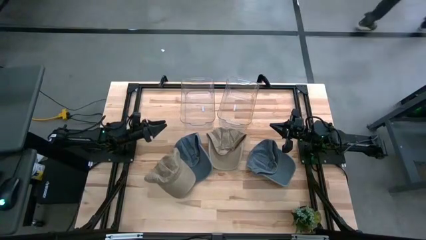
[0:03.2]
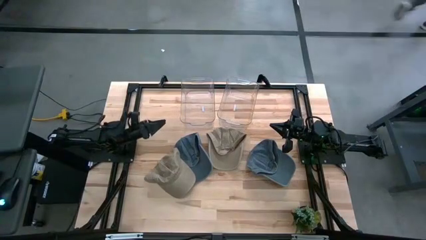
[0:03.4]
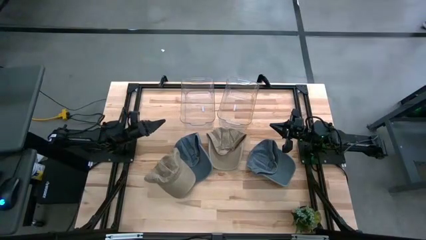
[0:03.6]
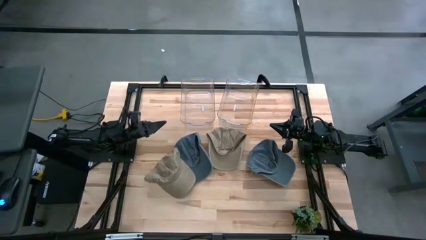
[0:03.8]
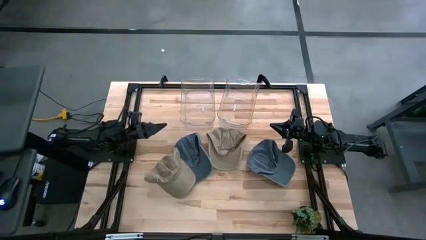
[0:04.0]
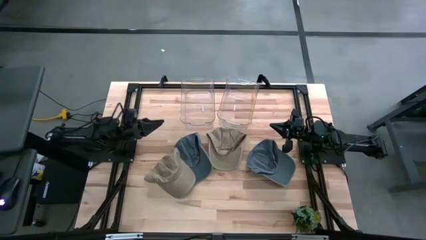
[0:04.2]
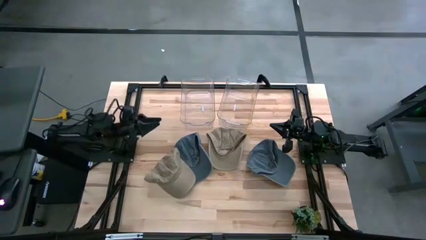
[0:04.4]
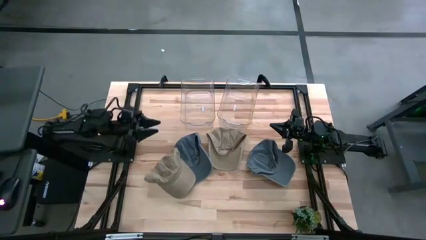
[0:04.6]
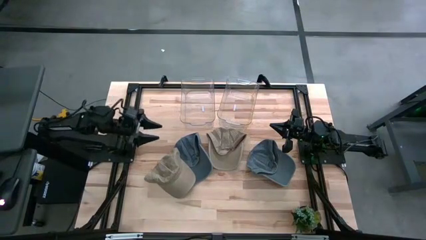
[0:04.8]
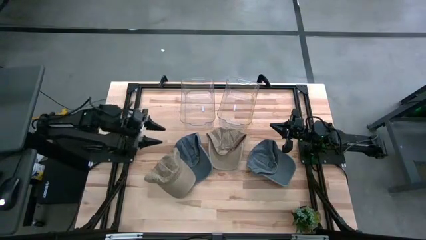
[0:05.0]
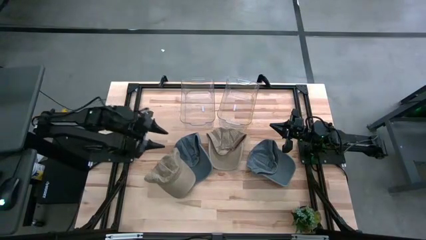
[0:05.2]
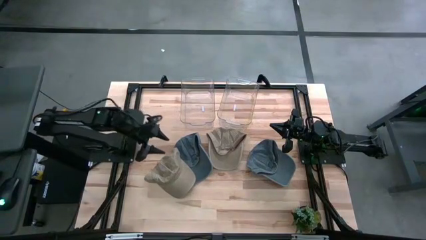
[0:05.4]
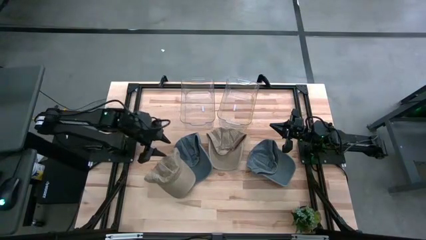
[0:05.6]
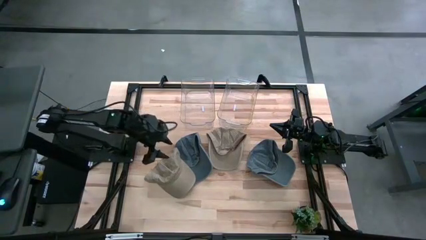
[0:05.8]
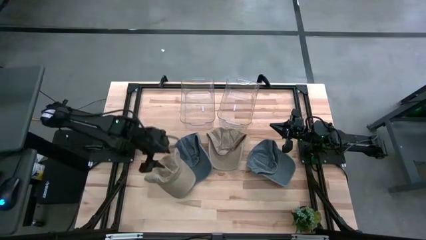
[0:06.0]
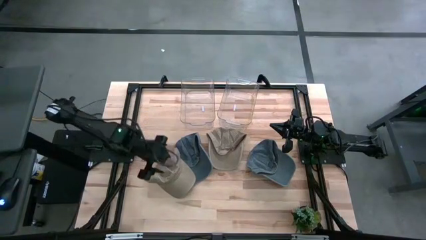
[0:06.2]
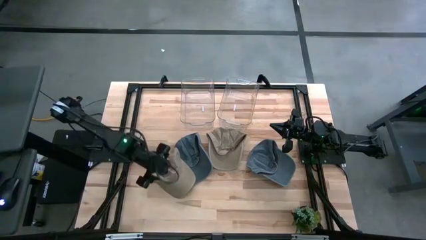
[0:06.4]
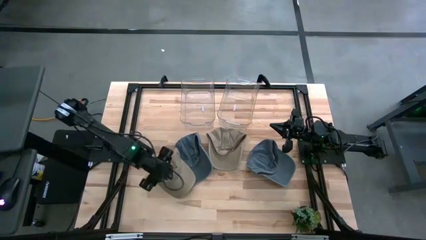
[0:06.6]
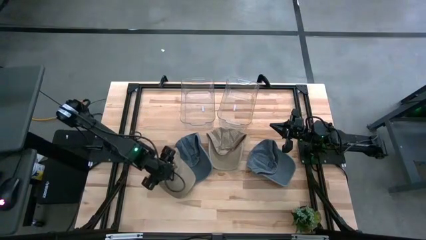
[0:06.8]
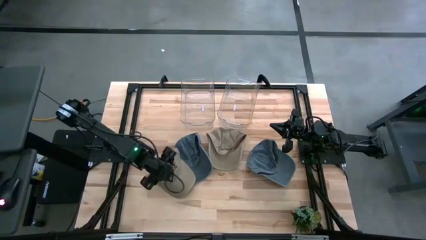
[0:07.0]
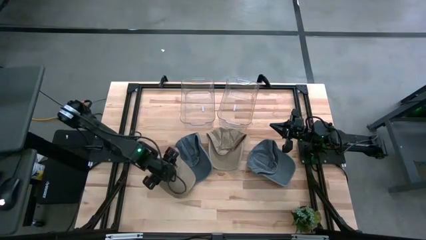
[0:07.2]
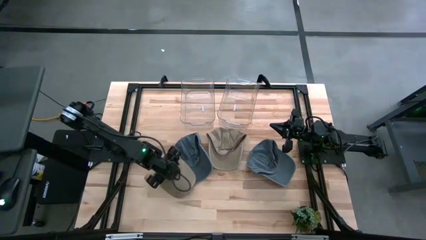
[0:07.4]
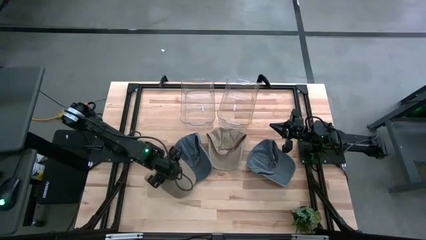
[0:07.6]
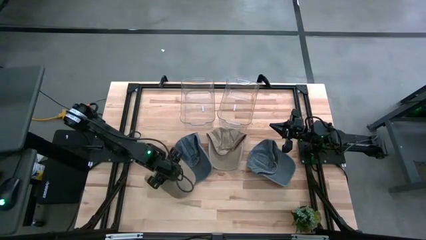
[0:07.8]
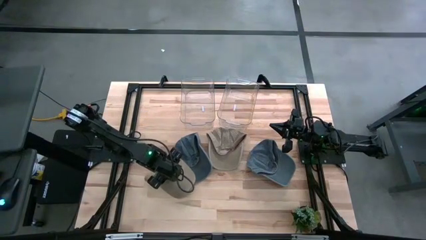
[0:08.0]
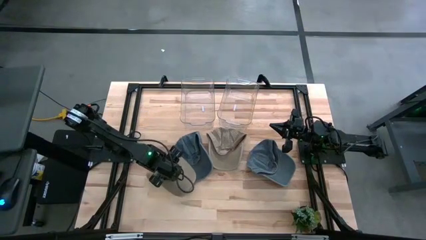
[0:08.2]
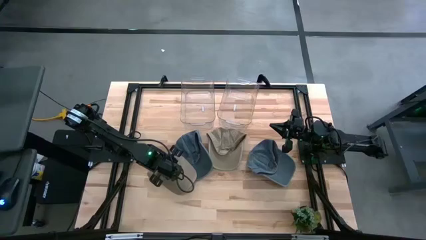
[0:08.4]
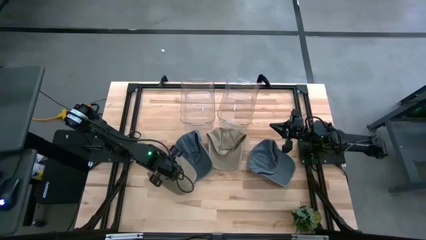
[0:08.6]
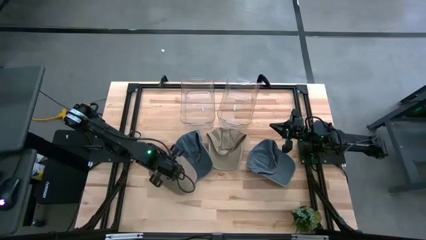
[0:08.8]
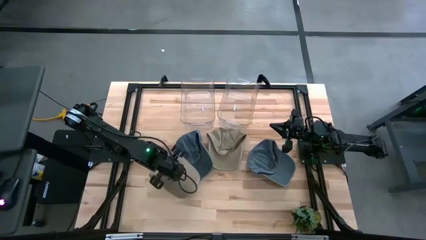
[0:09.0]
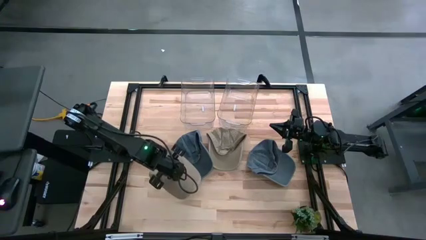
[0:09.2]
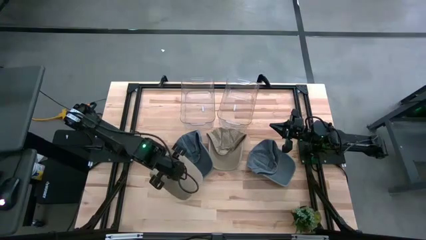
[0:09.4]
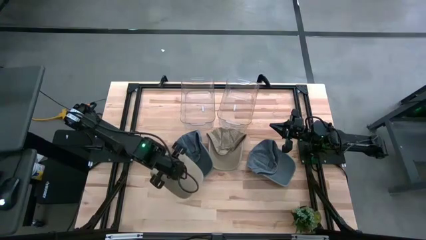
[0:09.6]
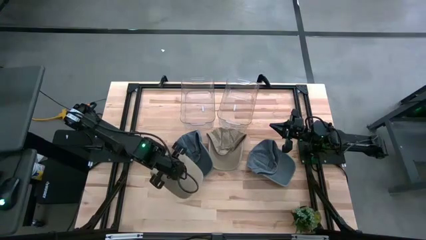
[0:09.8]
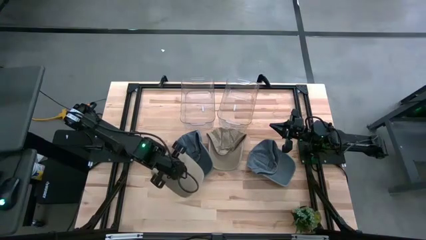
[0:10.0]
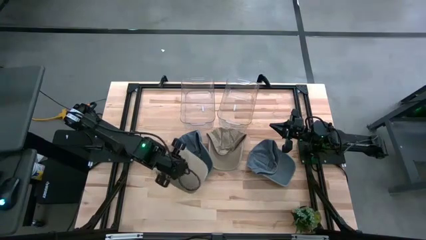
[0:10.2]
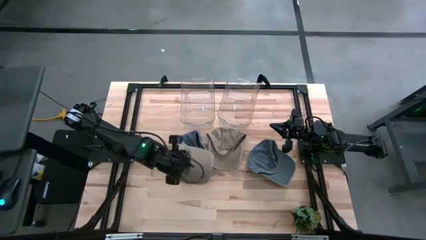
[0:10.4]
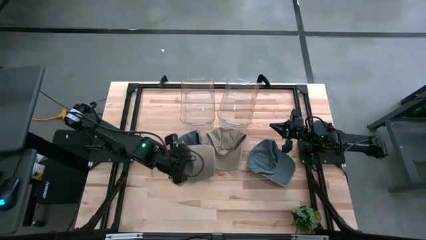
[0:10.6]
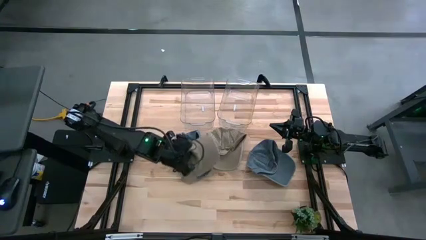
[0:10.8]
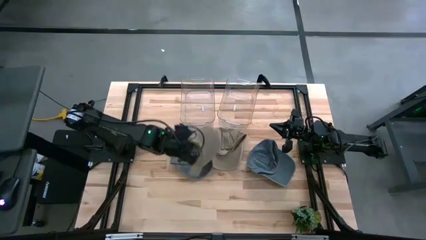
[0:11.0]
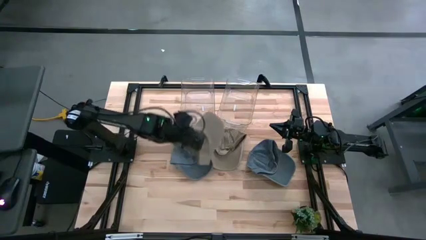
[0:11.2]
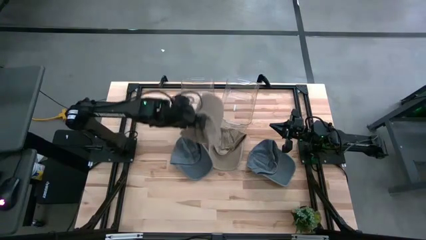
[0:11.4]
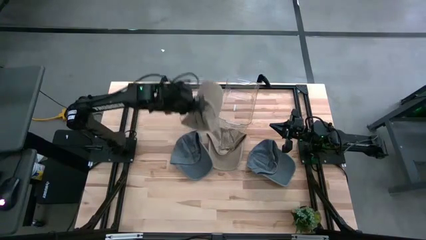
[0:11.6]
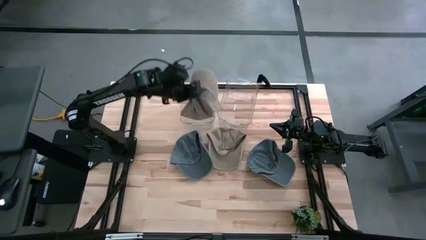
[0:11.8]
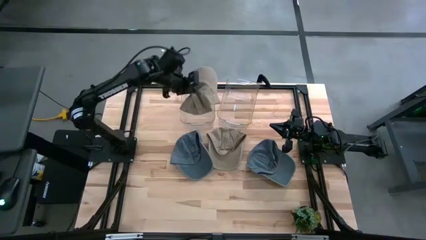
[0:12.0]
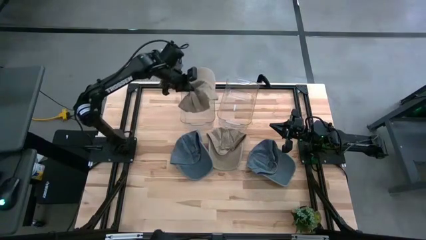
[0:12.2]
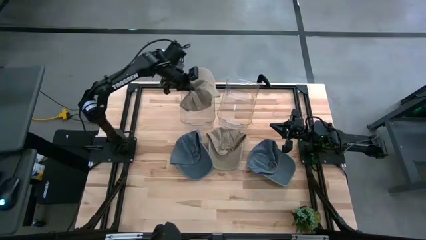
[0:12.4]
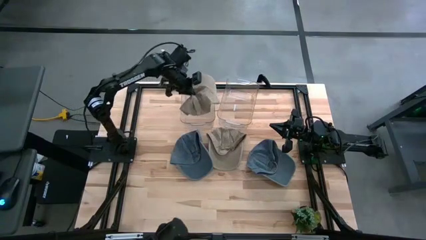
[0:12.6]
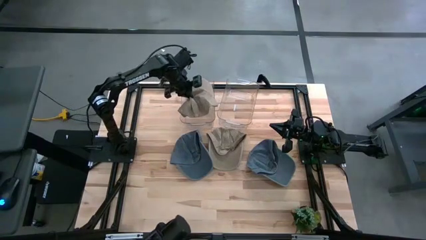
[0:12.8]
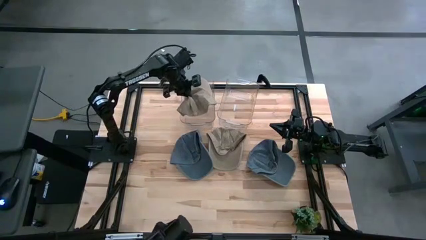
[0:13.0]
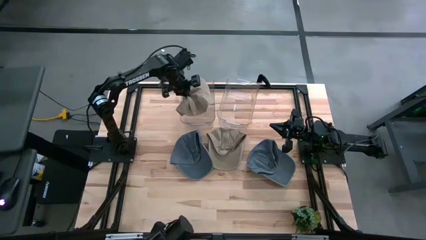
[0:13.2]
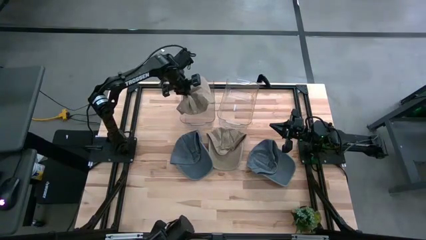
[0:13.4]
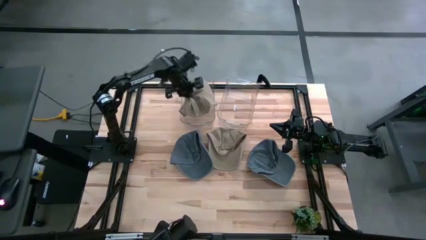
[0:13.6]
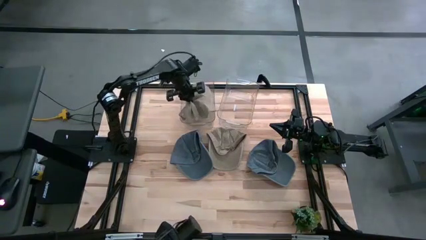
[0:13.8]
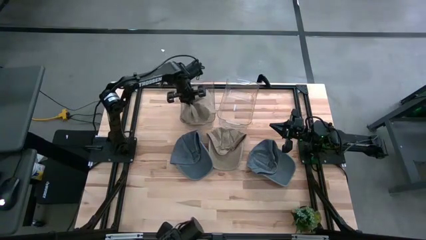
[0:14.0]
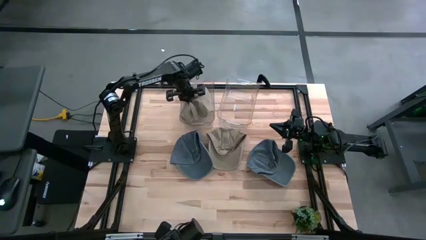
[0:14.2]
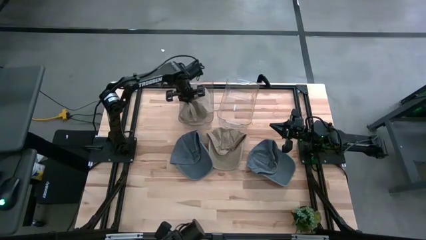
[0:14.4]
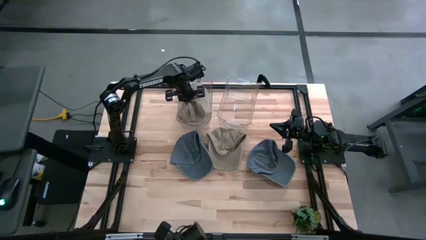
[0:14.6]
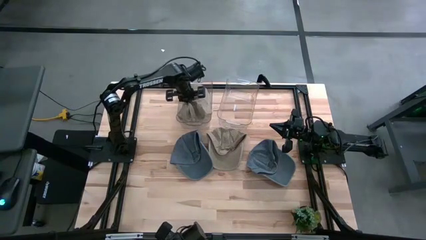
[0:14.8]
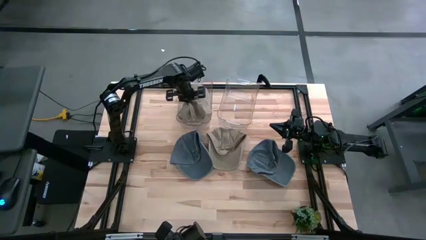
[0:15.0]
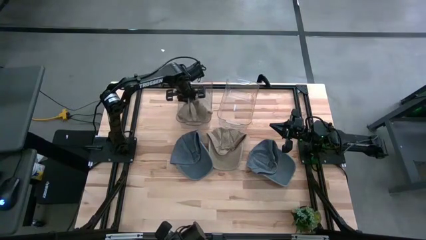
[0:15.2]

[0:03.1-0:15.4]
Task: Pick & Place hat
Put the left brown cap into the left transparent bin
